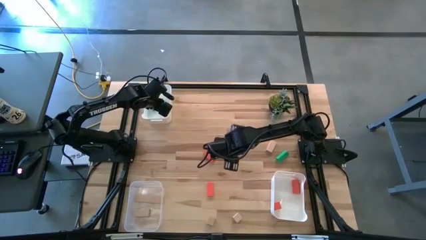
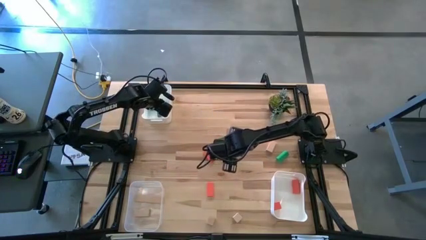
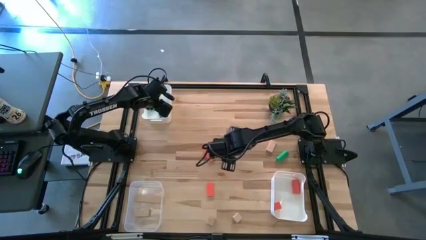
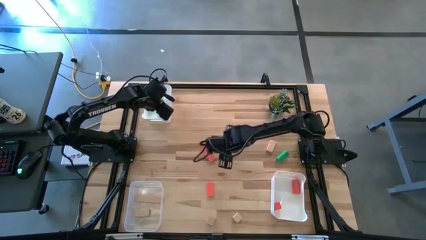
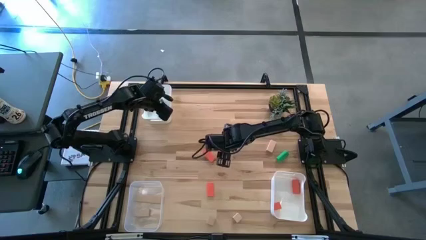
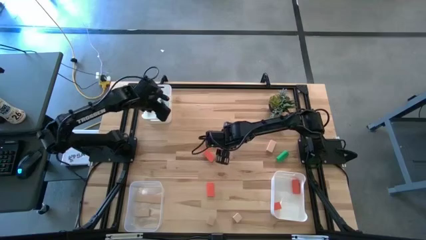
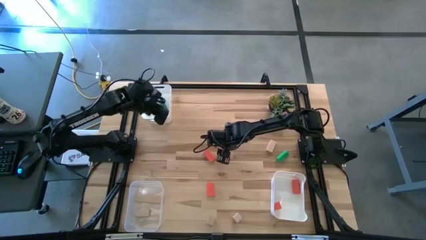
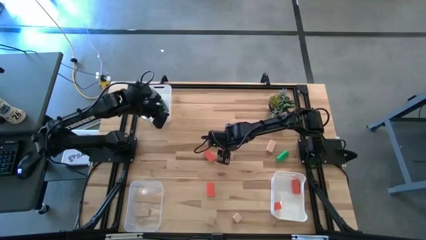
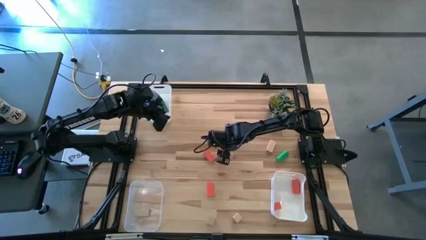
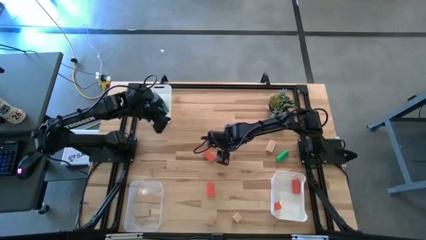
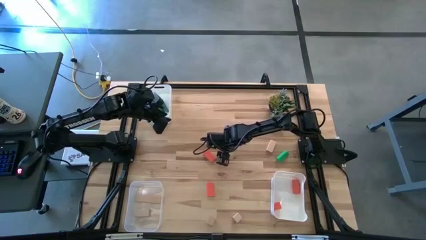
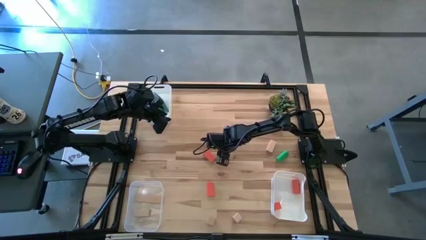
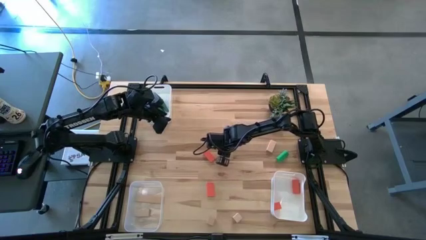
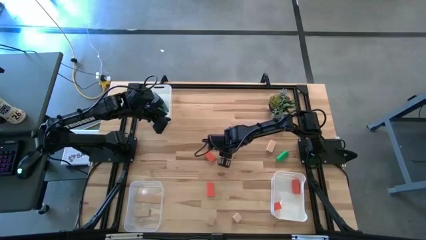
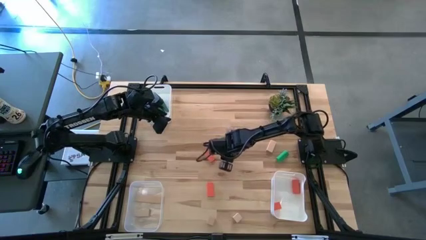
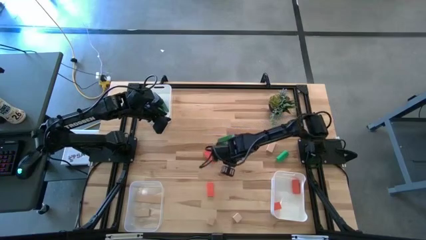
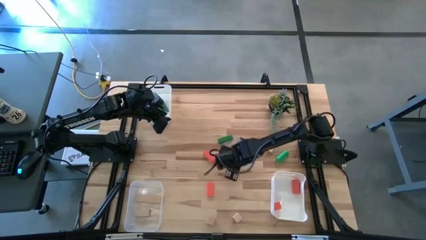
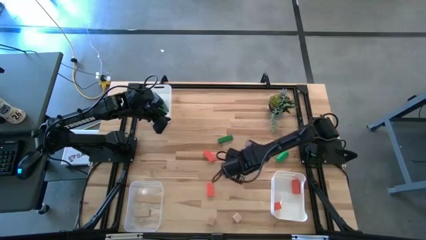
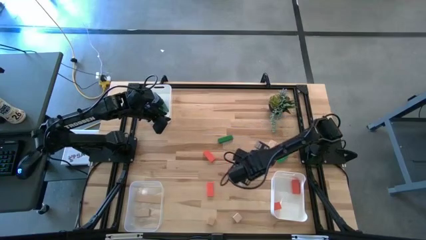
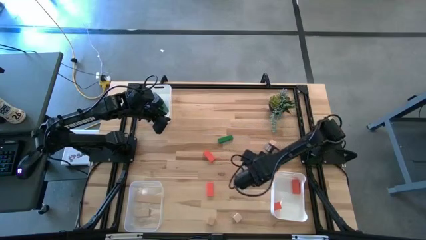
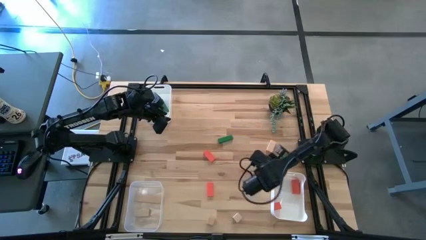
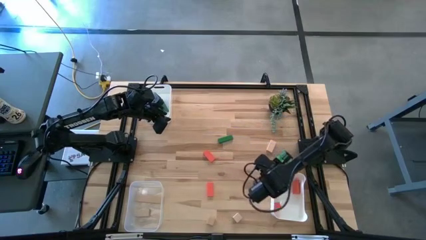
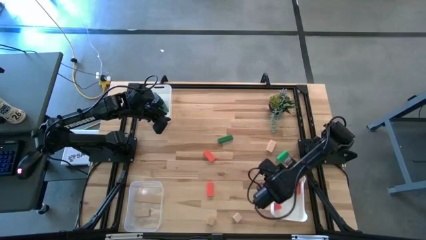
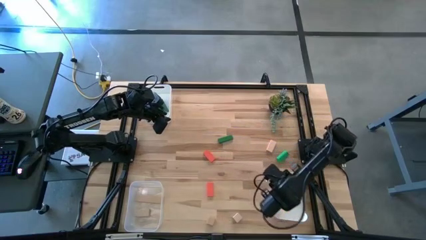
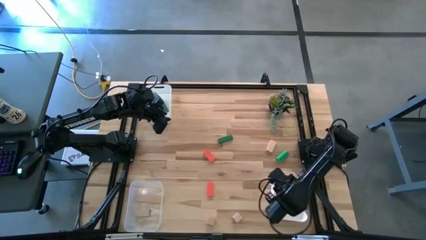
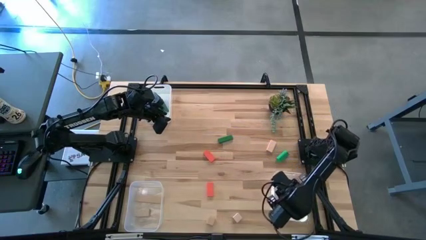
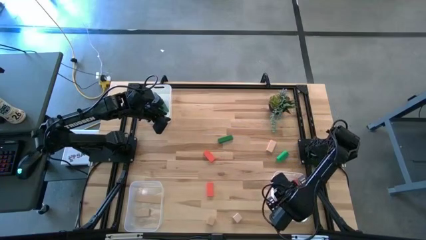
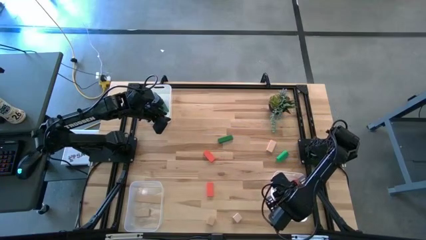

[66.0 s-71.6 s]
Task: Sort & place blocks by color
Put the orange block into the bottom white bin

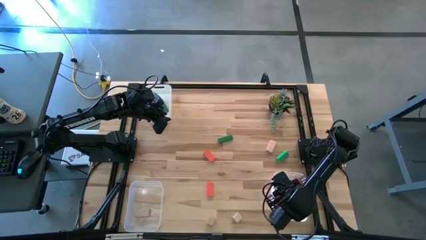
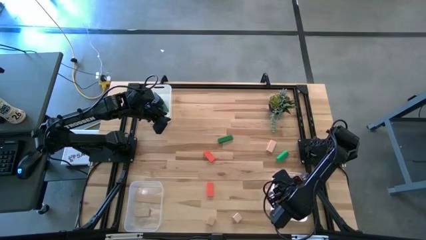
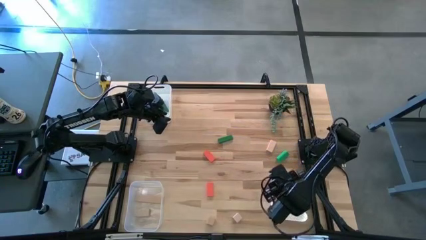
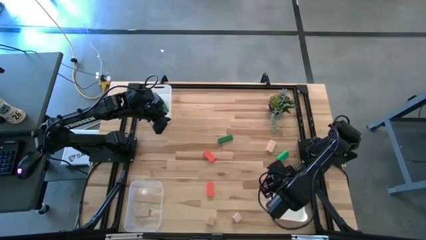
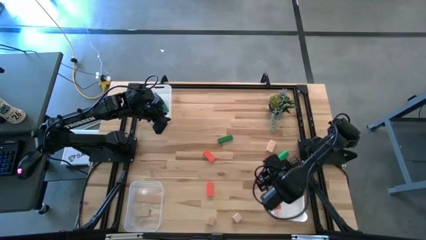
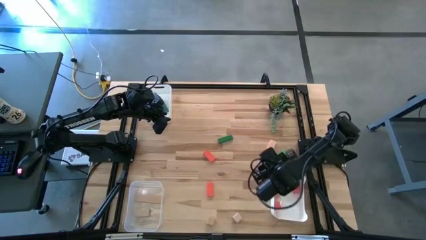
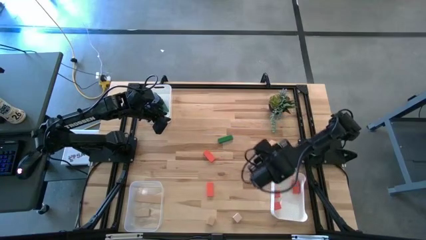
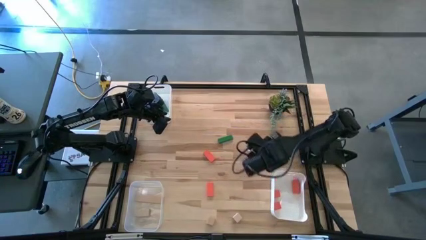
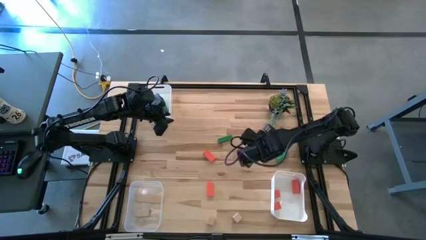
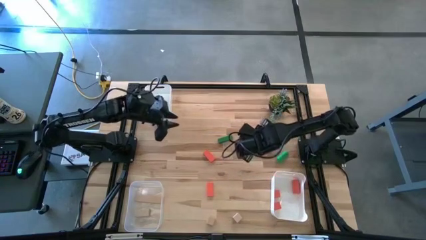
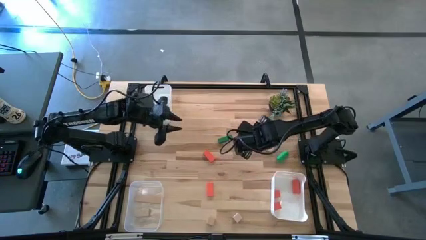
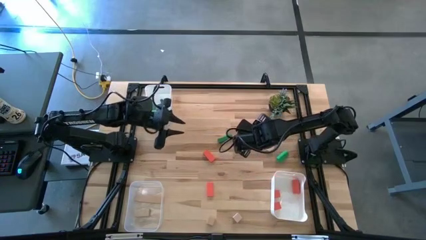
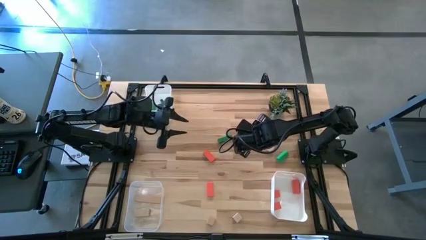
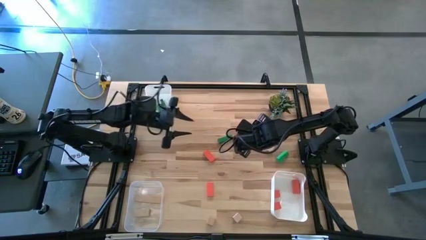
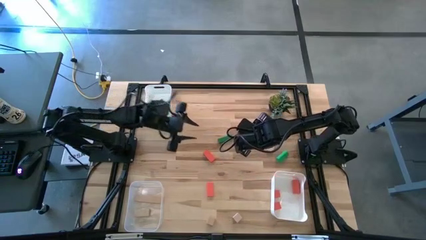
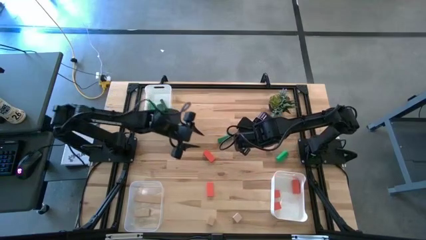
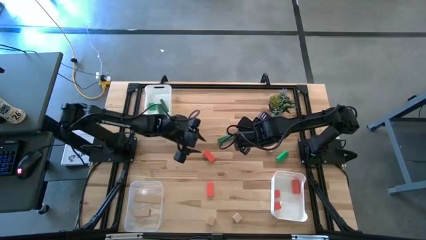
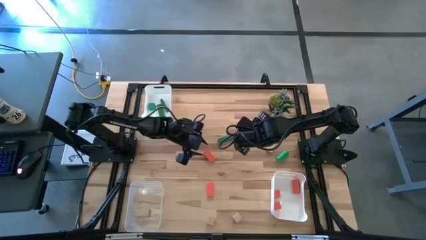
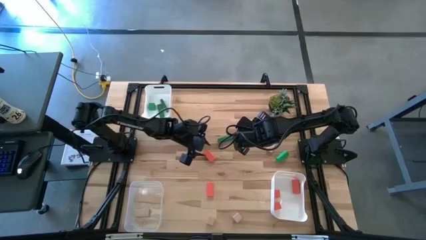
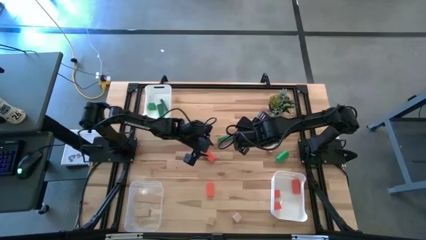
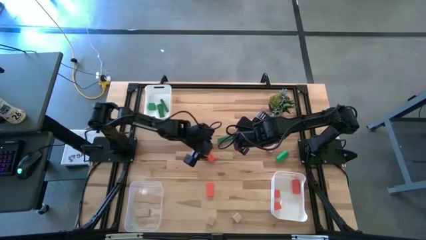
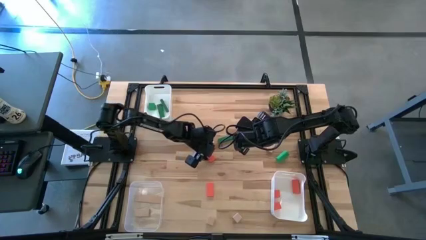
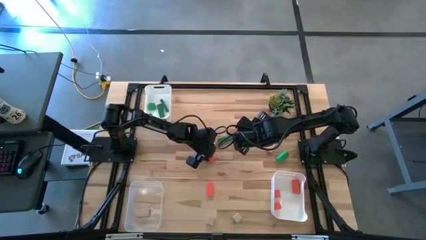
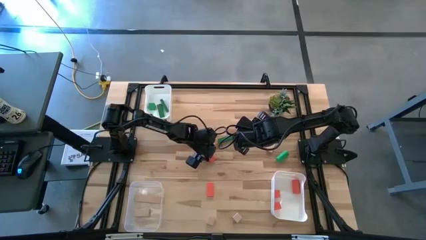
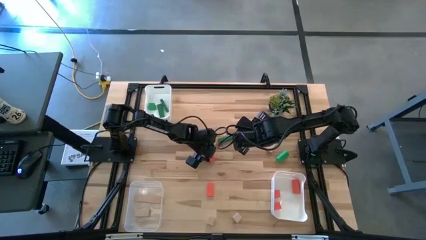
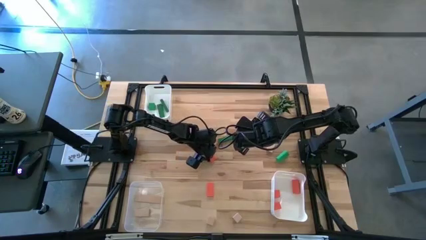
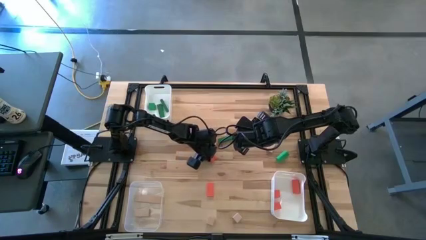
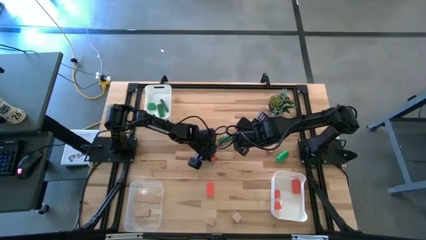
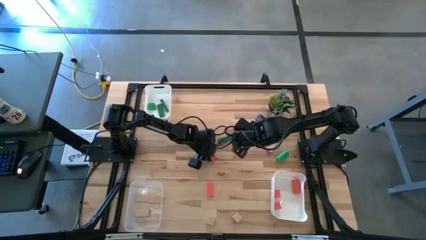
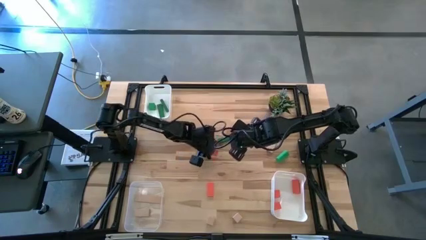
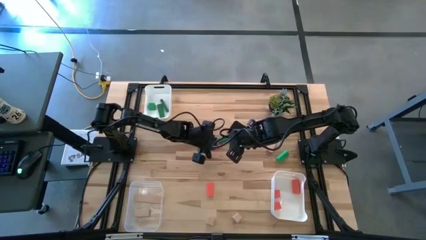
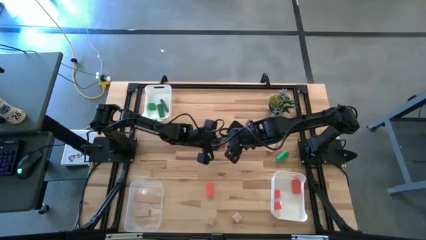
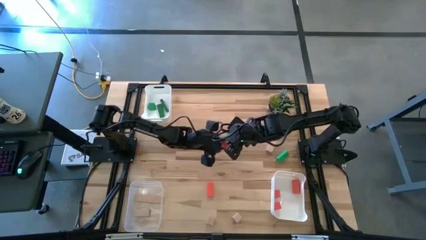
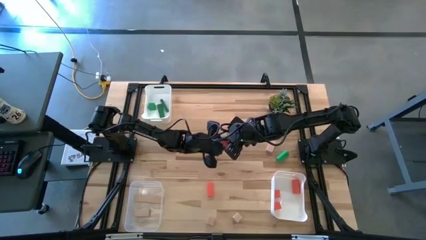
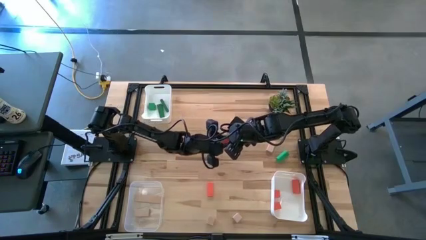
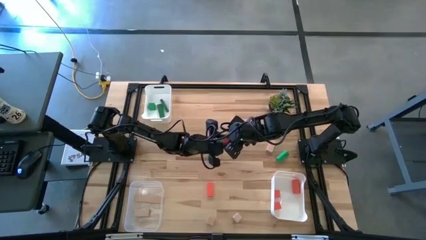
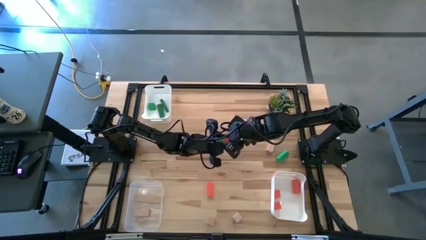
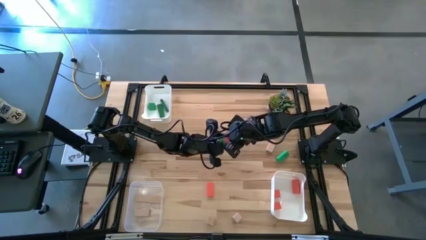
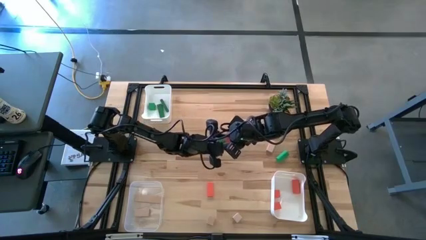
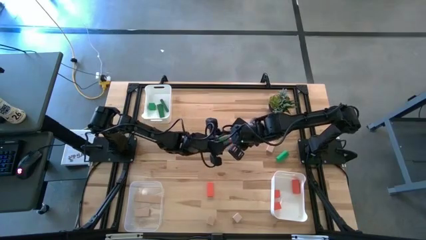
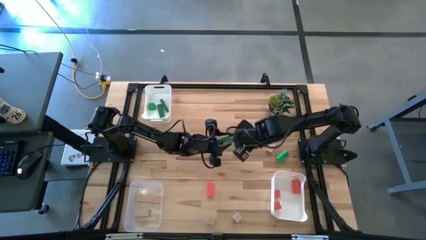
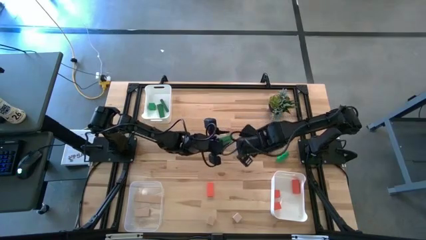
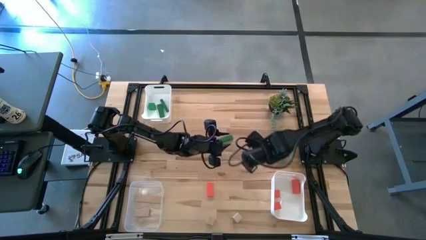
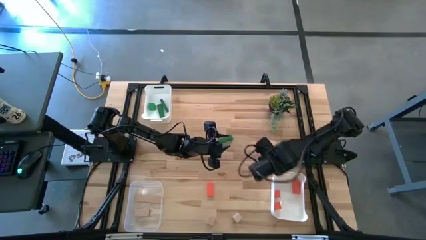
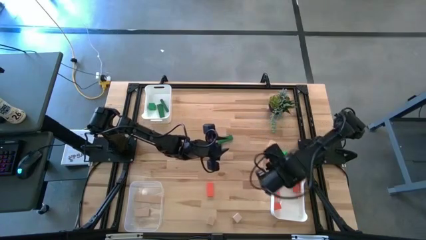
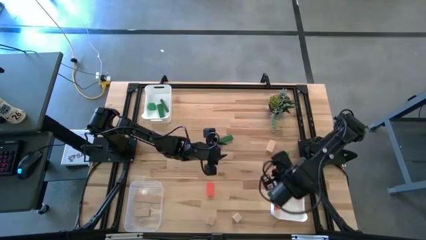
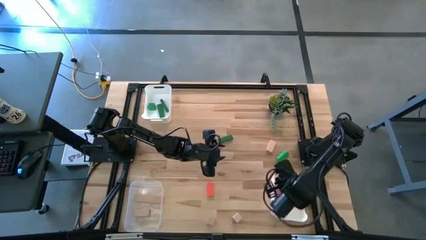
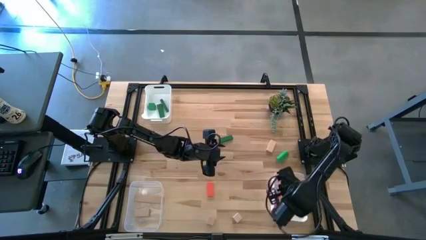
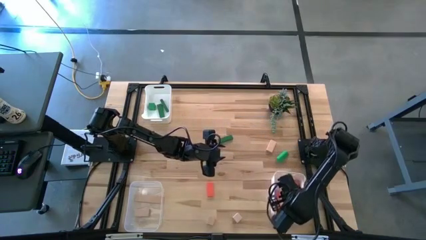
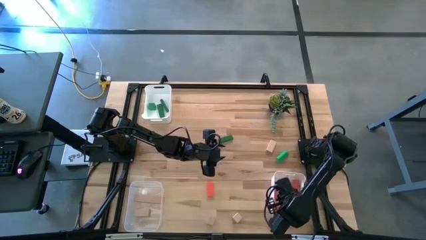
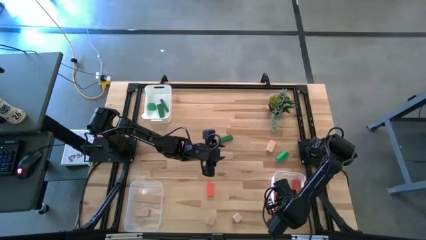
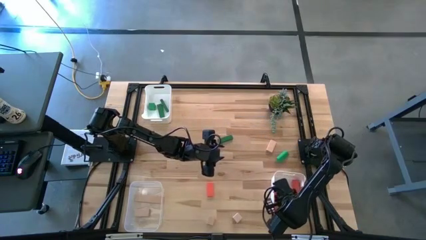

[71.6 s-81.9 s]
Put the orange block into the bottom white bin

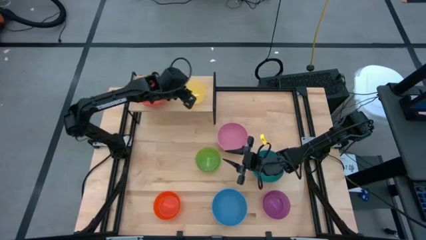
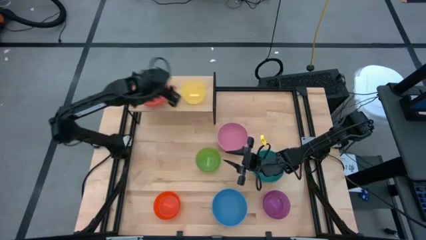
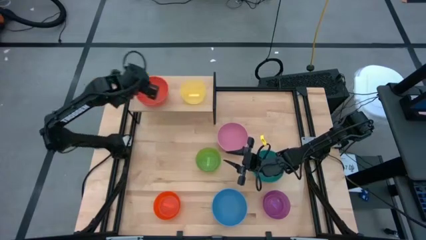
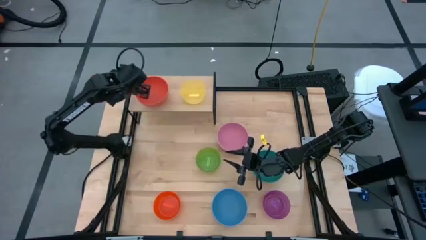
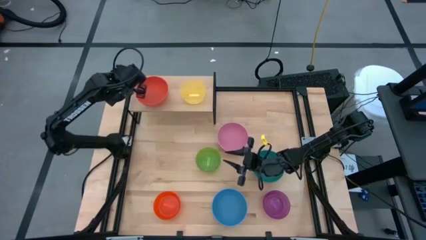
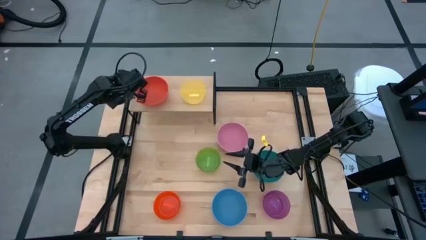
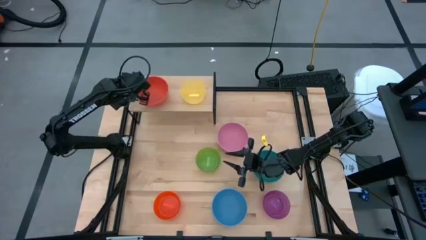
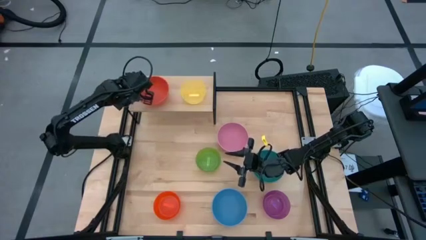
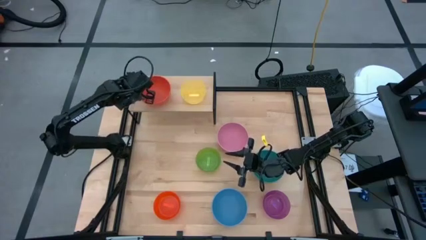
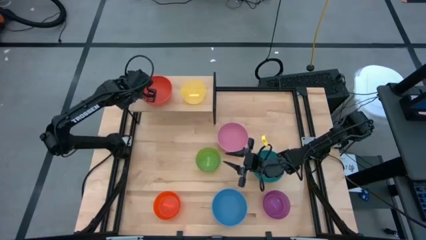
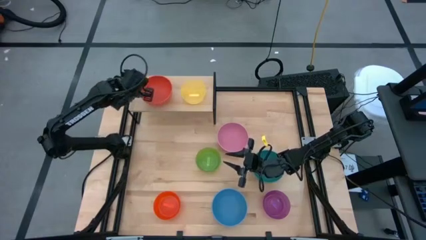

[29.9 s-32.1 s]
Task: Place and stack bowls onto a shelf
Adjust the orange bowl on the shelf
